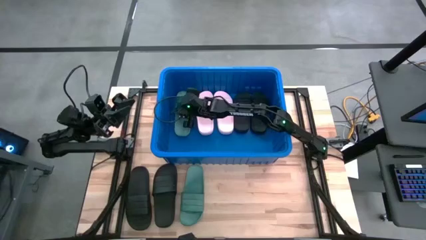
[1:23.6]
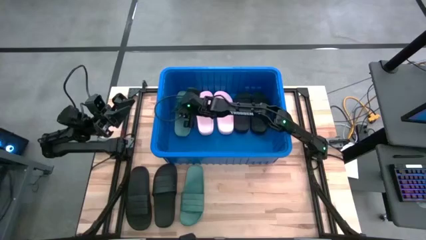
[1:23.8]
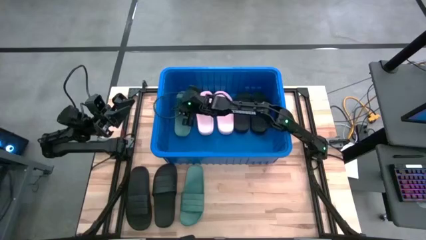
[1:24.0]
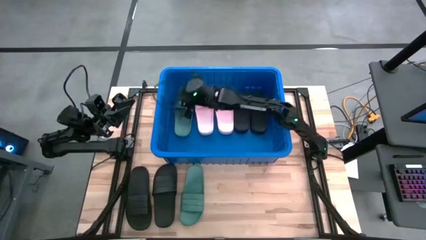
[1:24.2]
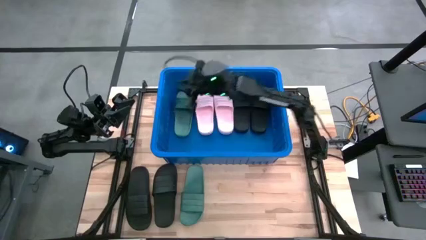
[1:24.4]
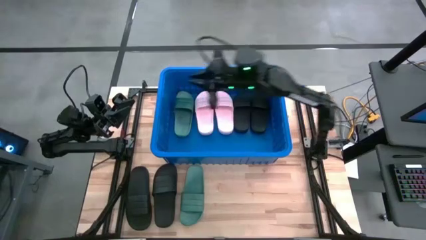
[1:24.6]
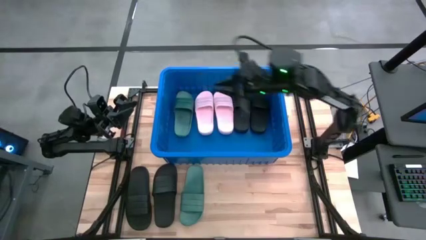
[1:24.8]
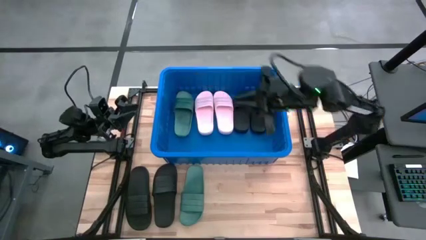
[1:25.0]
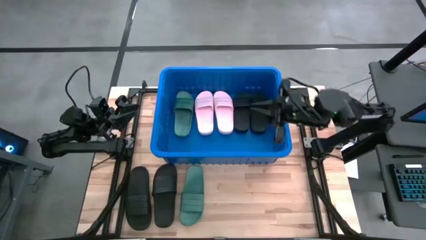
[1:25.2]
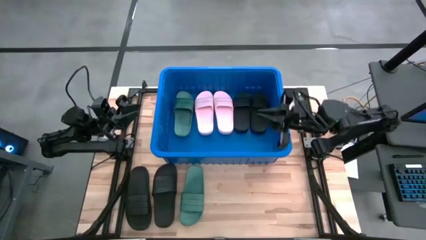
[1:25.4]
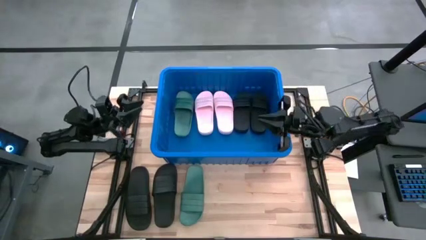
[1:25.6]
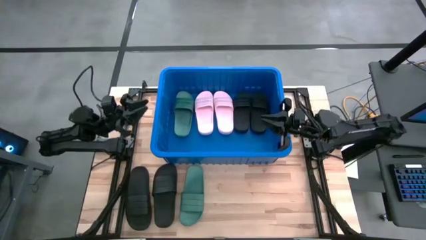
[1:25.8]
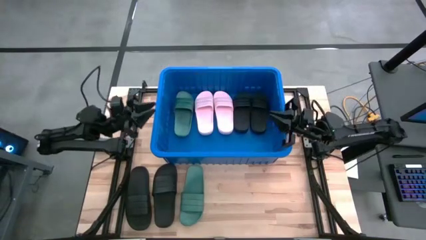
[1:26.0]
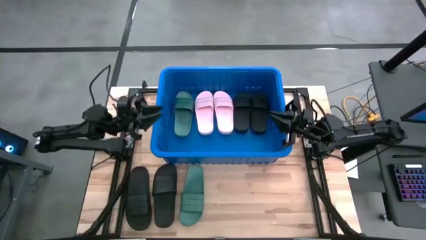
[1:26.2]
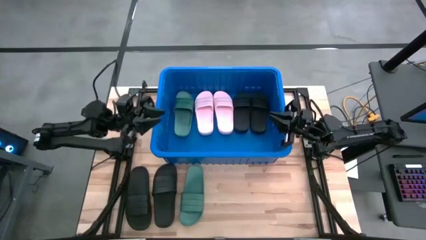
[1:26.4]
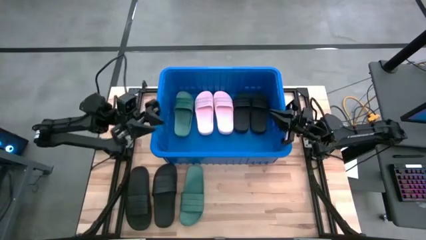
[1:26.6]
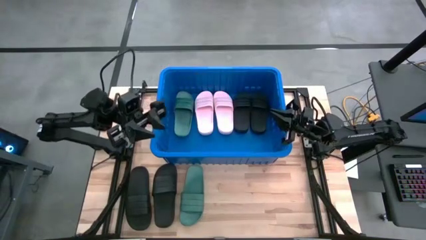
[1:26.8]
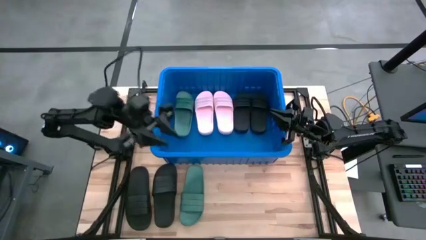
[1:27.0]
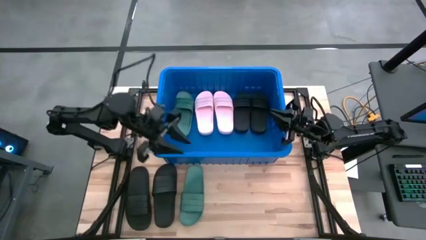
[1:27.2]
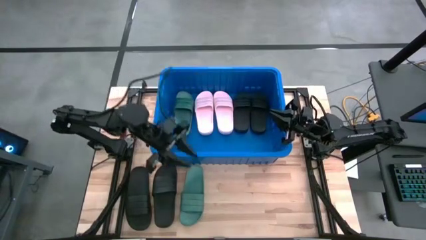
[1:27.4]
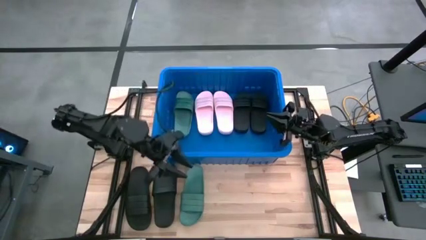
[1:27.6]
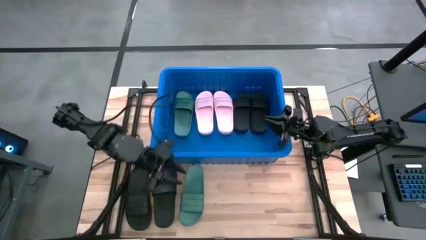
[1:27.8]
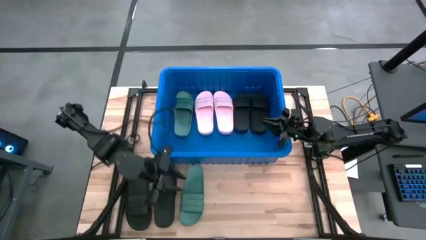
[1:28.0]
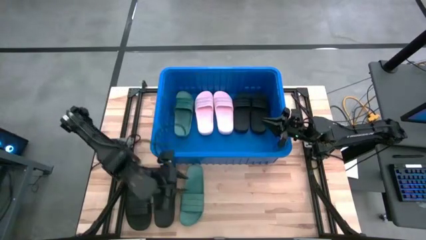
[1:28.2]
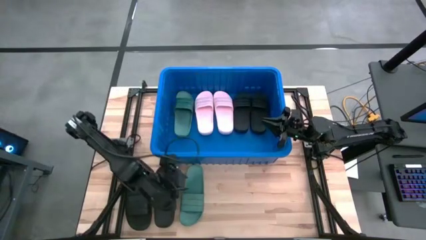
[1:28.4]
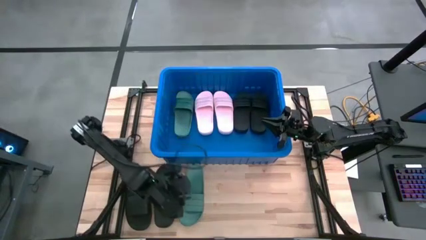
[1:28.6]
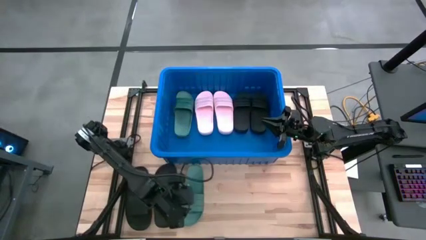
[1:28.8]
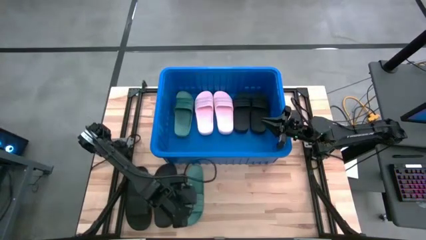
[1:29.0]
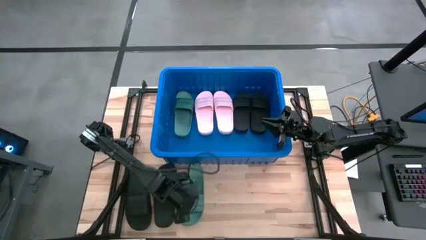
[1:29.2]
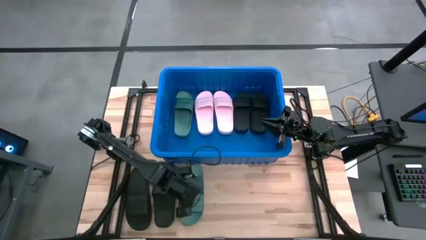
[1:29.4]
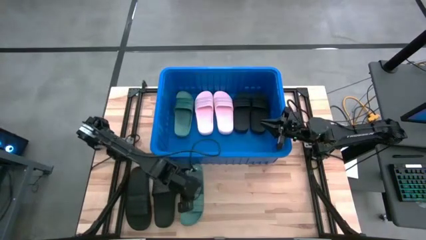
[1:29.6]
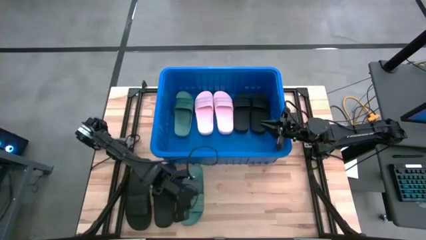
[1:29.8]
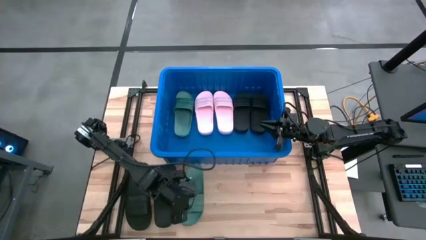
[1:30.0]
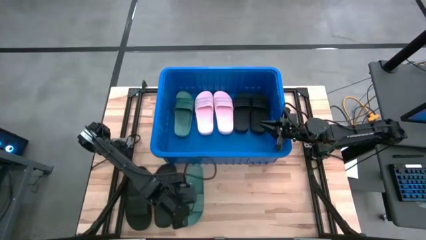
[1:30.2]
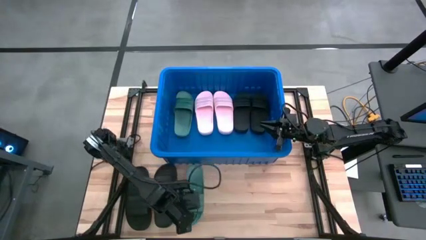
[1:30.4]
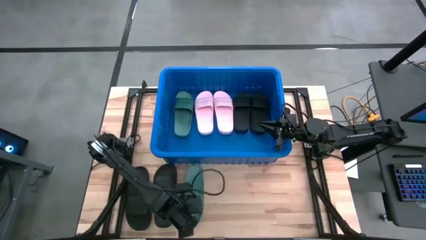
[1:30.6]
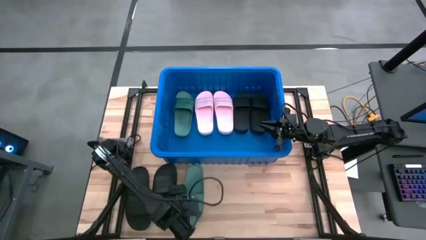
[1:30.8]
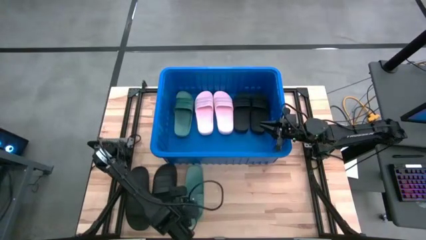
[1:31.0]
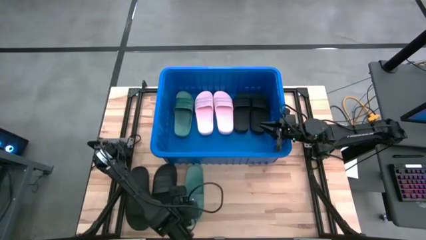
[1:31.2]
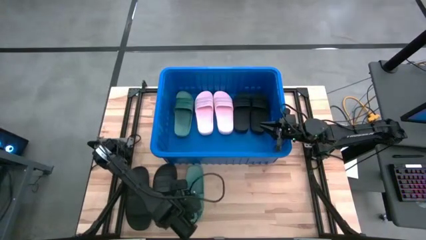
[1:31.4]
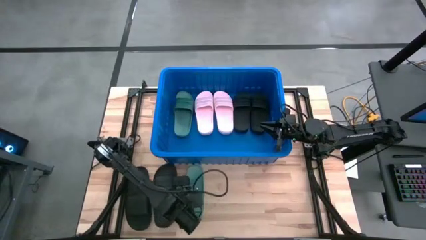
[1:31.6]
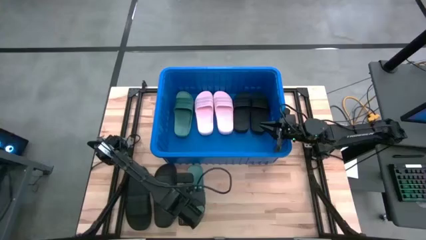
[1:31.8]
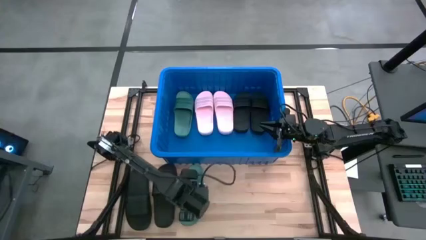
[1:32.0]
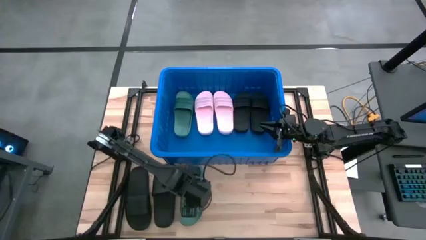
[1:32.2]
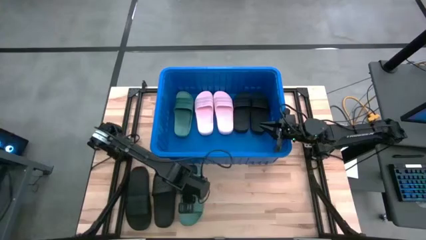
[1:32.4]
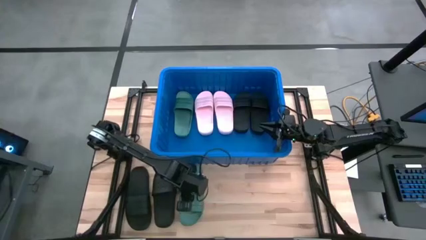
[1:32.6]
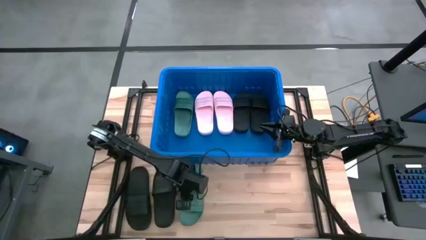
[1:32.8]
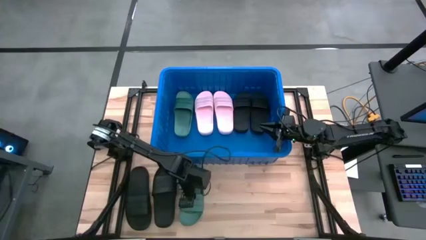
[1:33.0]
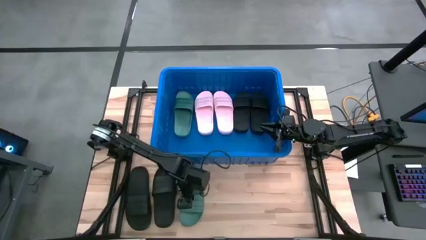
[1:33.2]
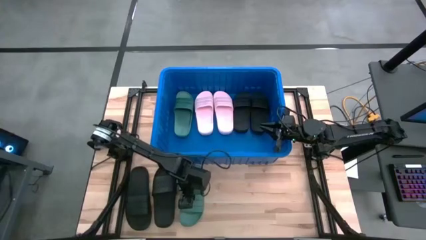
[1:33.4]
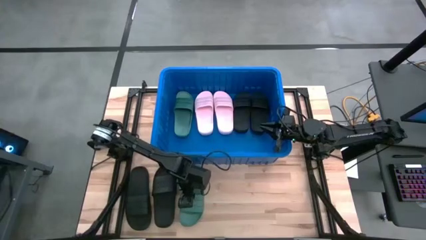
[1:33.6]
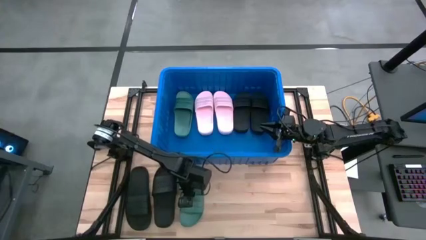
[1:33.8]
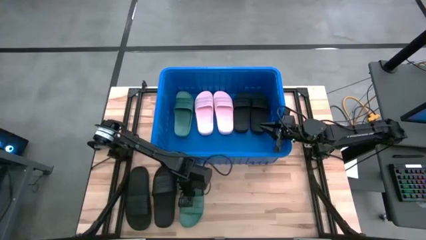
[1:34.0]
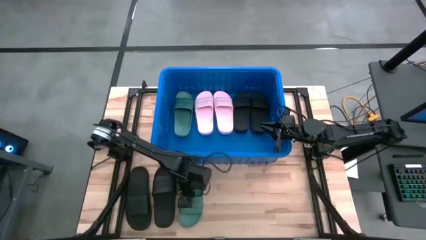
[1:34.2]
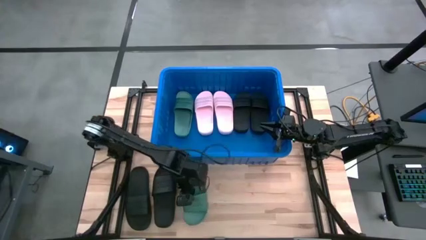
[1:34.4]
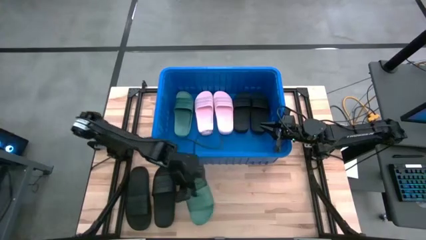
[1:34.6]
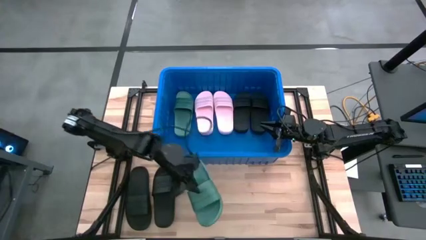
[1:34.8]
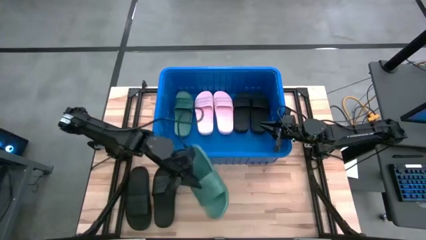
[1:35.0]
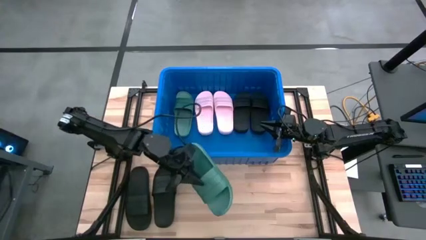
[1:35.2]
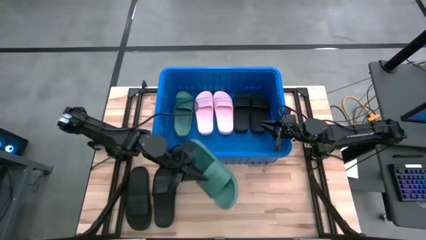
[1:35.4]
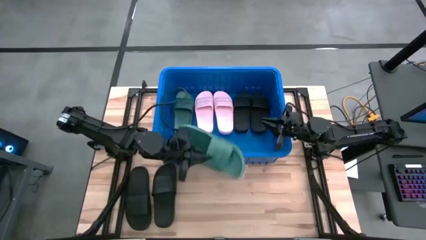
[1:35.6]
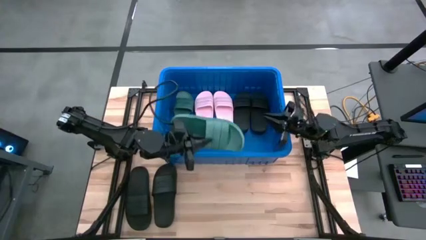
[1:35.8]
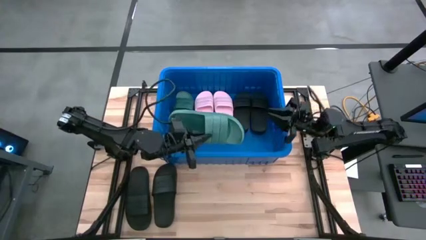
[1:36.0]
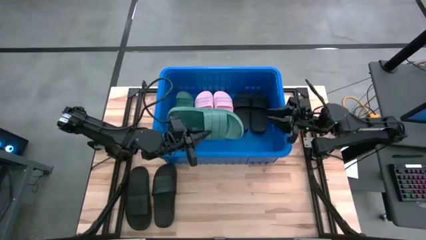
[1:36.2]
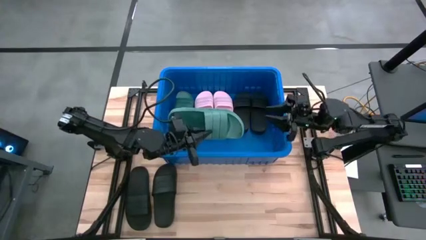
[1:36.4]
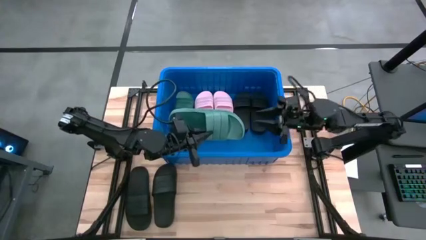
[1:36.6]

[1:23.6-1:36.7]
Task: Pick and place slides into bin
Put the green slipper into the blue bin

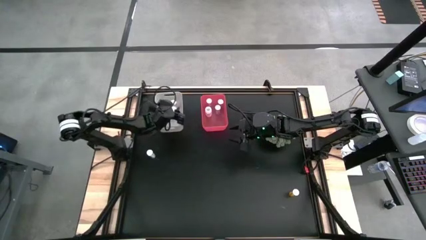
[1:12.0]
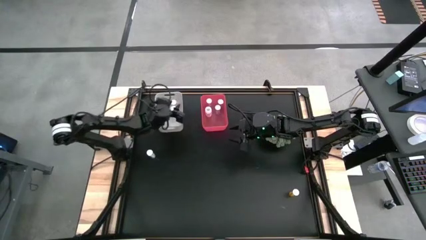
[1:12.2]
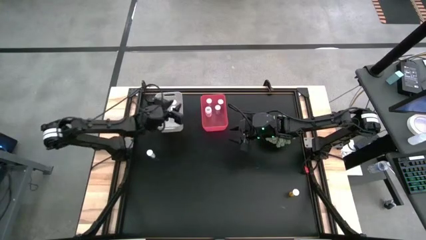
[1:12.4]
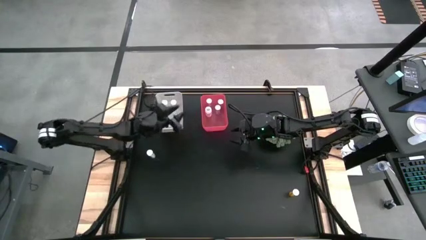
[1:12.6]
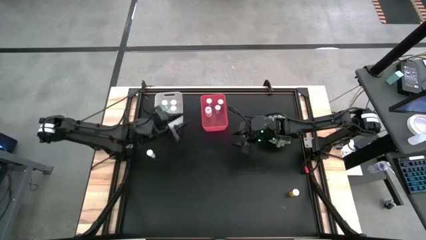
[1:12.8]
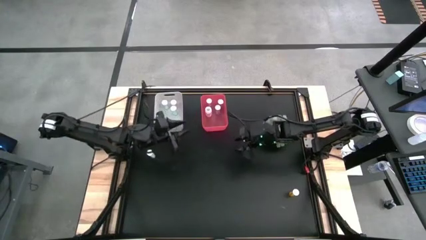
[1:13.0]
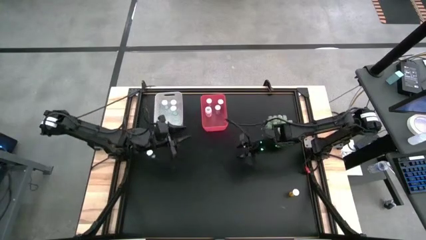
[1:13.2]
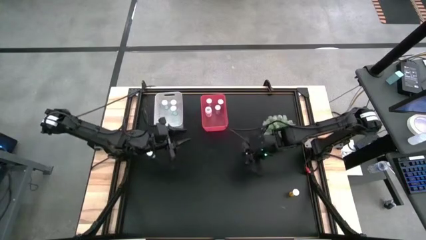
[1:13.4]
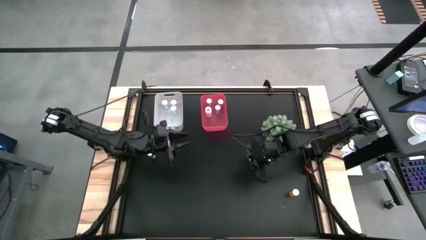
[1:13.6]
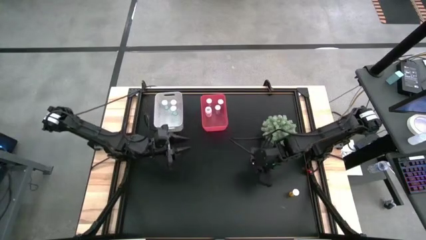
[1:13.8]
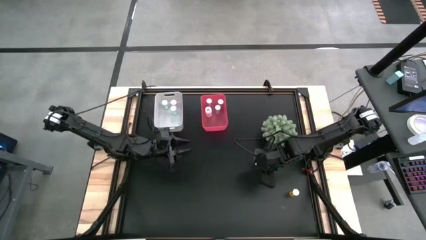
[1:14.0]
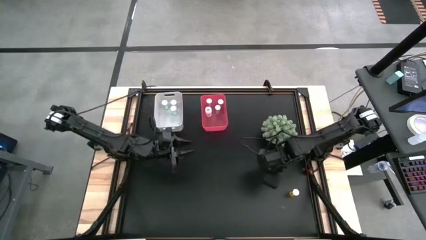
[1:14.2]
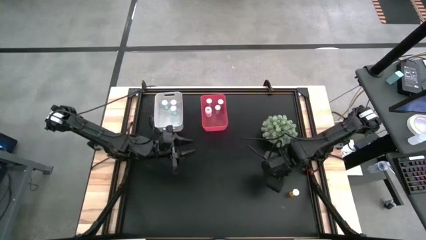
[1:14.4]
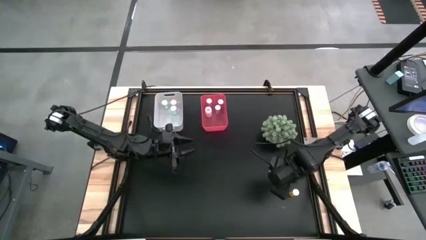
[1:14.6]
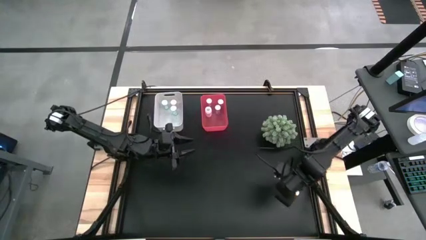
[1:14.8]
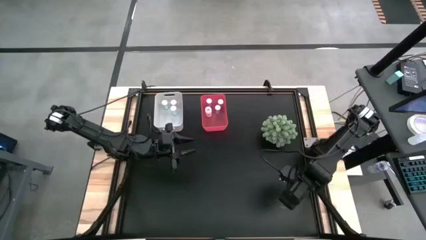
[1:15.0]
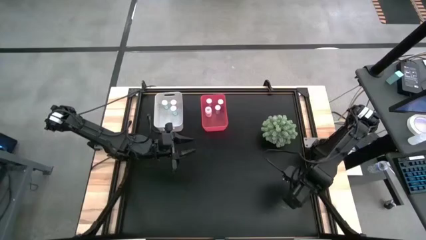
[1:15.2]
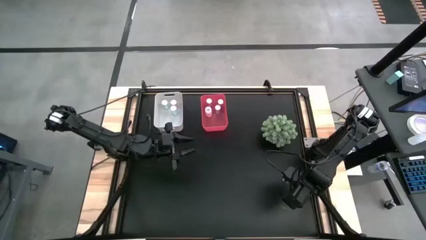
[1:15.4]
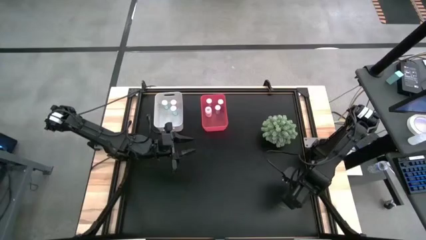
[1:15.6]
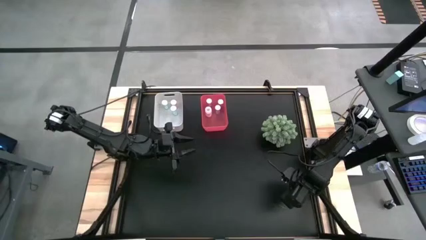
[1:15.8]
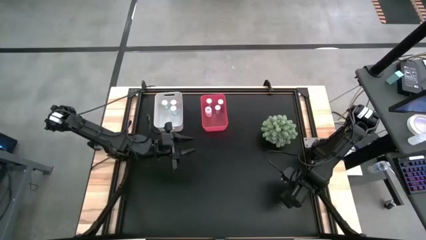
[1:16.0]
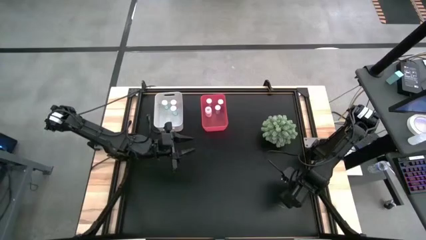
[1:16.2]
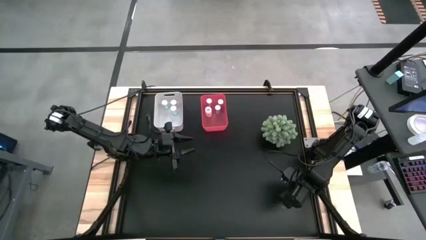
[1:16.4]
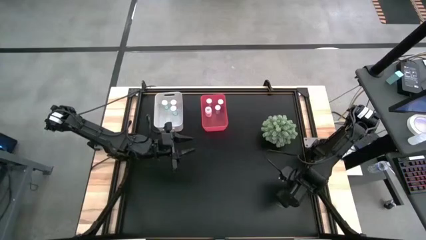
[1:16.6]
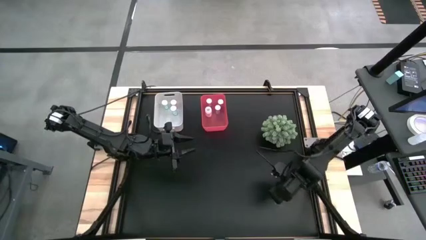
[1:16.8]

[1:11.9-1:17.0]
Task: Pick and place medicine bottles into bin by pill shape (circle, oval)
Put the orange tablet bottle into the white bin
